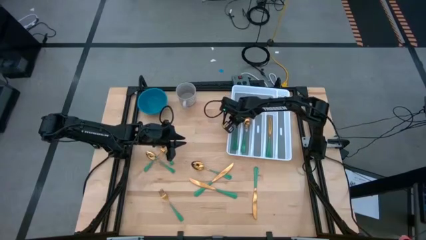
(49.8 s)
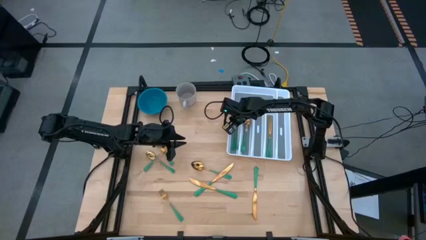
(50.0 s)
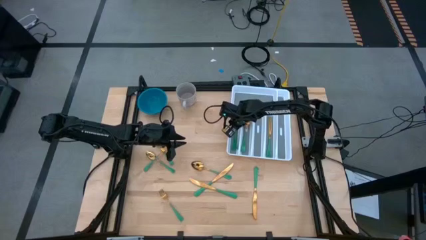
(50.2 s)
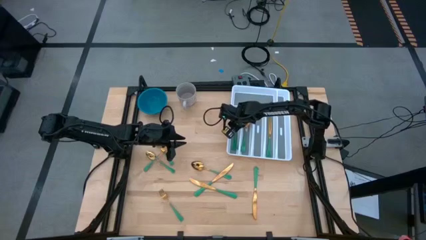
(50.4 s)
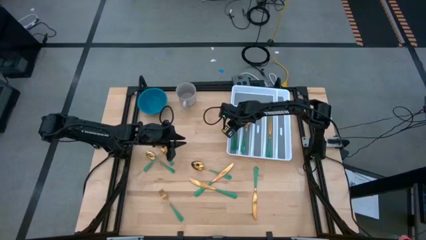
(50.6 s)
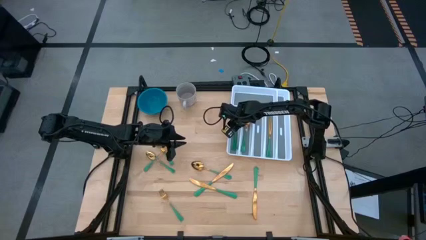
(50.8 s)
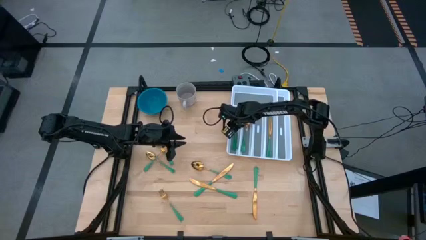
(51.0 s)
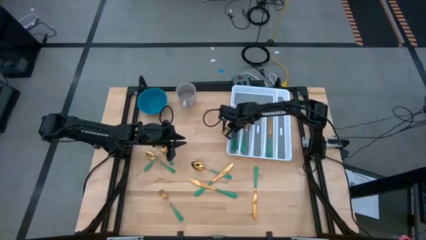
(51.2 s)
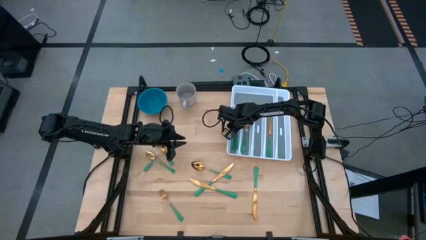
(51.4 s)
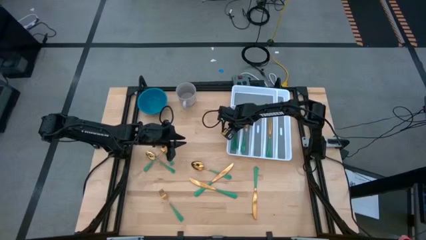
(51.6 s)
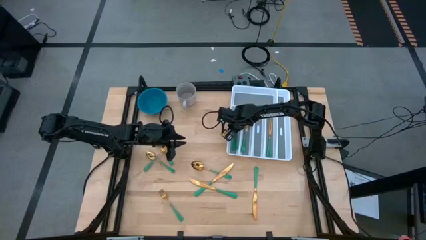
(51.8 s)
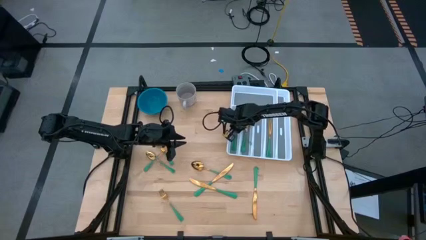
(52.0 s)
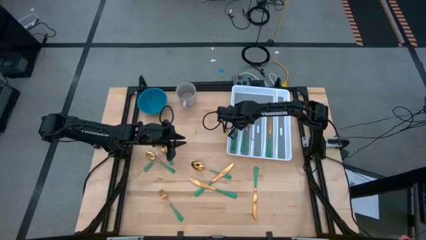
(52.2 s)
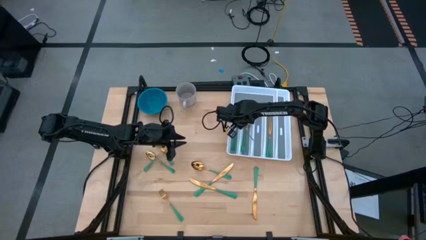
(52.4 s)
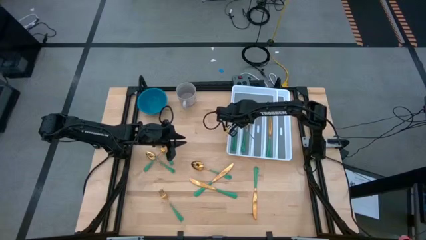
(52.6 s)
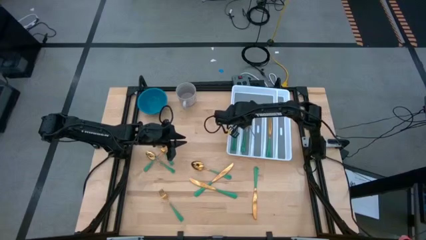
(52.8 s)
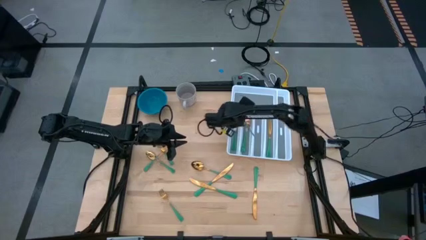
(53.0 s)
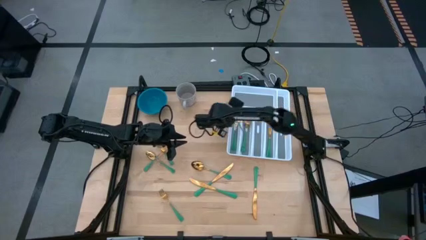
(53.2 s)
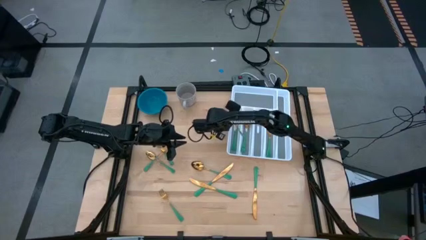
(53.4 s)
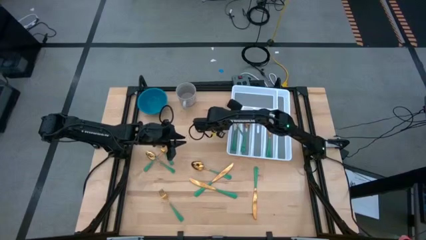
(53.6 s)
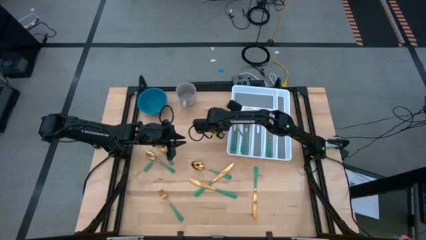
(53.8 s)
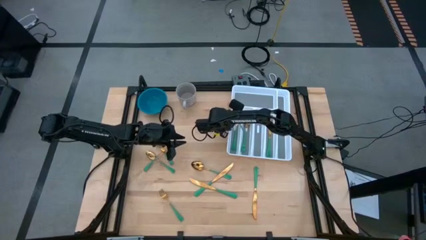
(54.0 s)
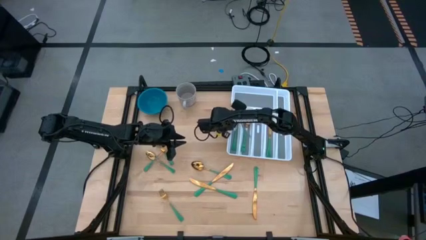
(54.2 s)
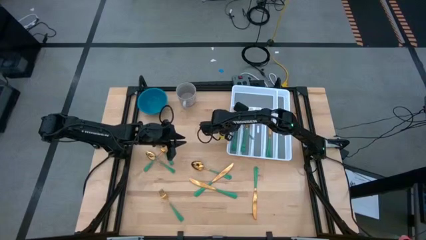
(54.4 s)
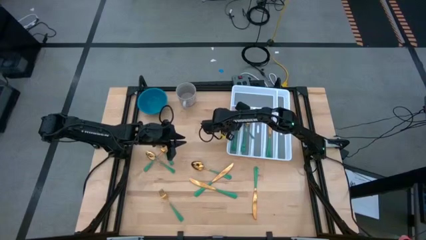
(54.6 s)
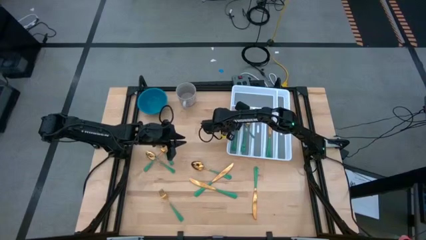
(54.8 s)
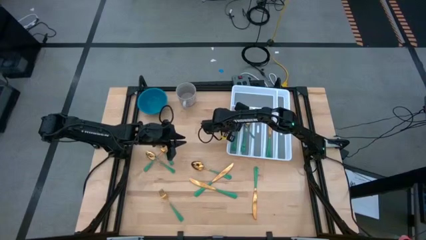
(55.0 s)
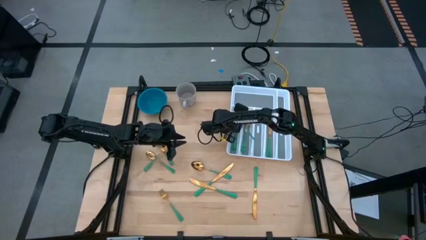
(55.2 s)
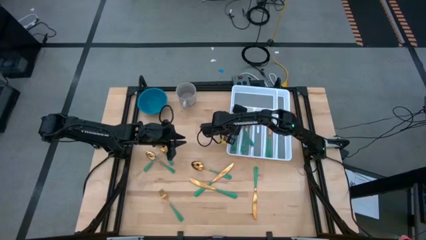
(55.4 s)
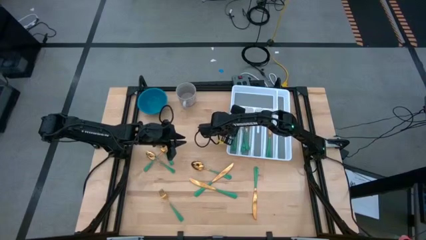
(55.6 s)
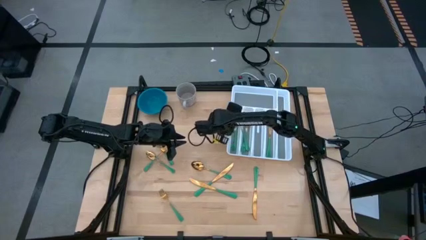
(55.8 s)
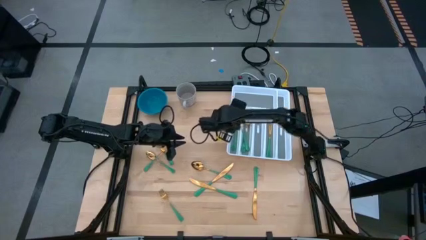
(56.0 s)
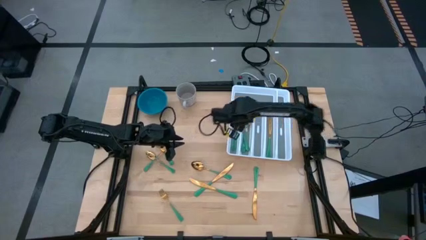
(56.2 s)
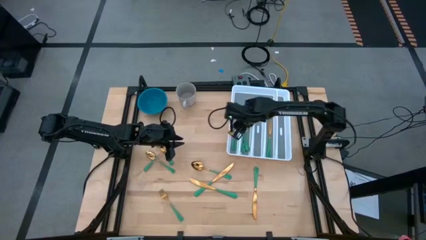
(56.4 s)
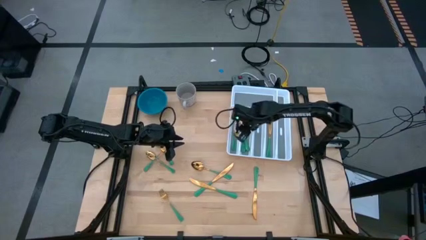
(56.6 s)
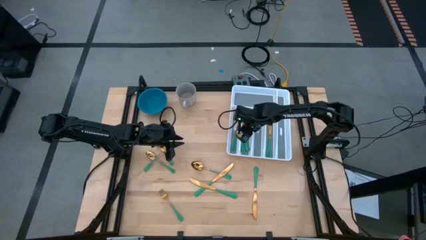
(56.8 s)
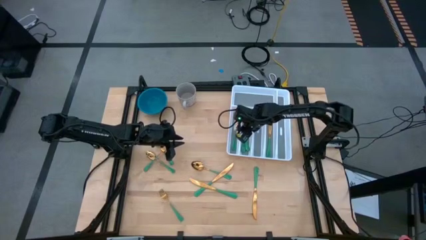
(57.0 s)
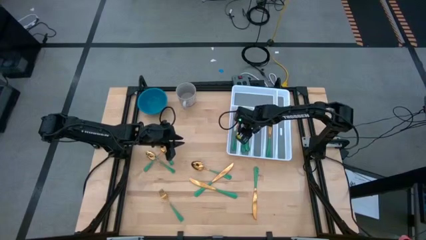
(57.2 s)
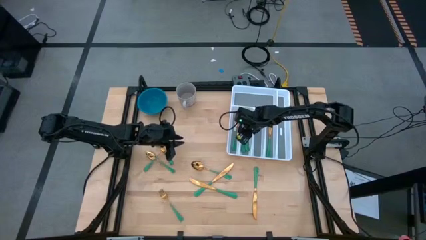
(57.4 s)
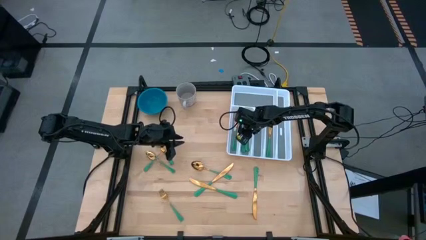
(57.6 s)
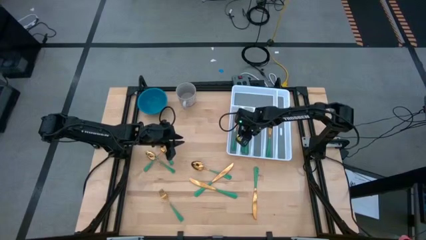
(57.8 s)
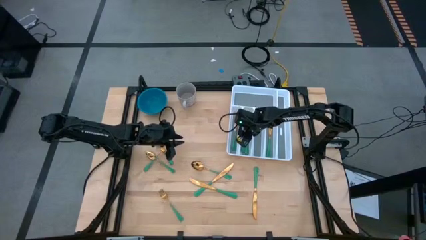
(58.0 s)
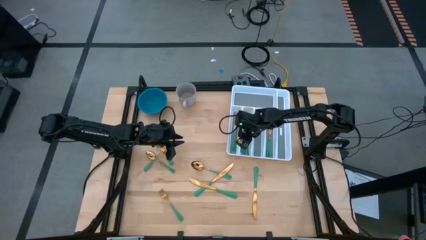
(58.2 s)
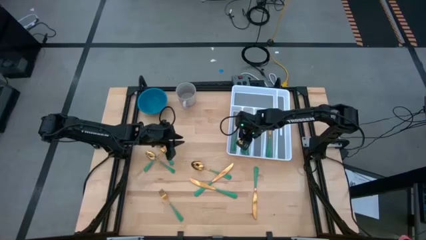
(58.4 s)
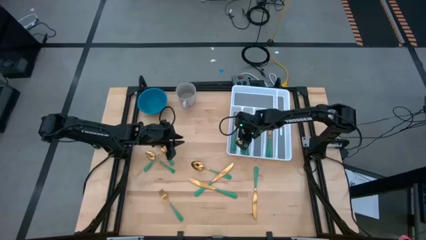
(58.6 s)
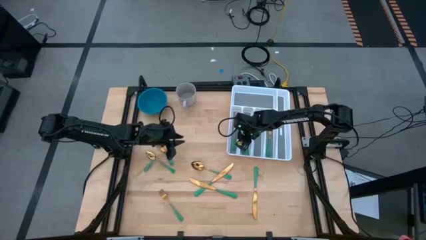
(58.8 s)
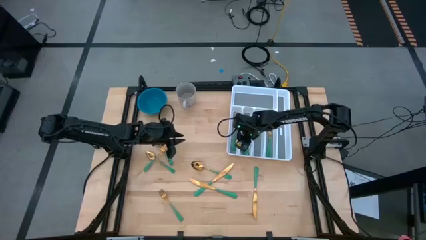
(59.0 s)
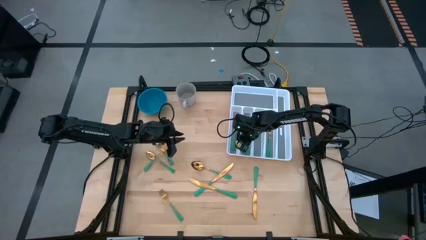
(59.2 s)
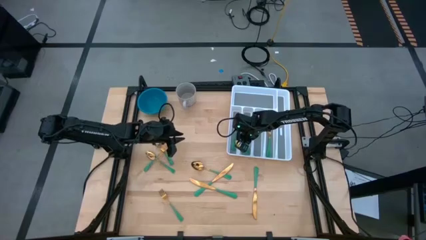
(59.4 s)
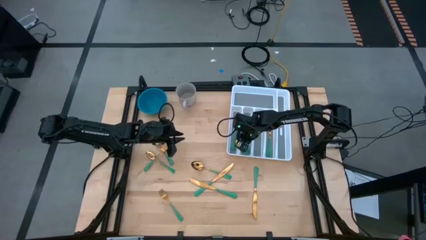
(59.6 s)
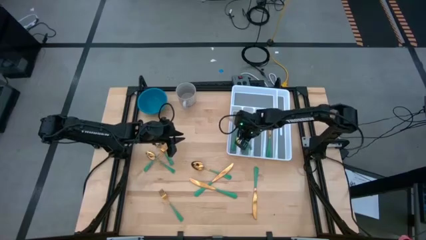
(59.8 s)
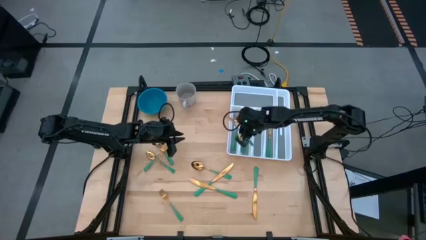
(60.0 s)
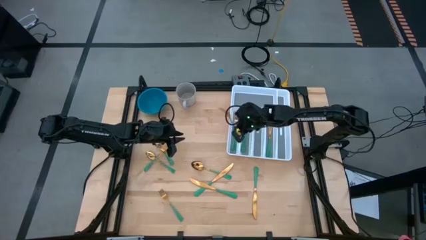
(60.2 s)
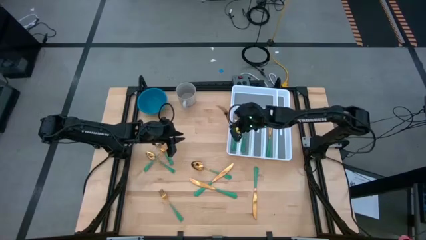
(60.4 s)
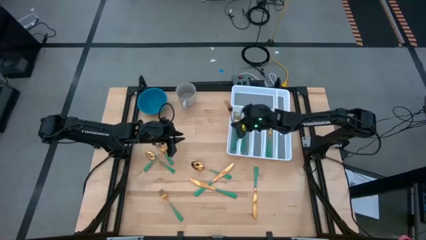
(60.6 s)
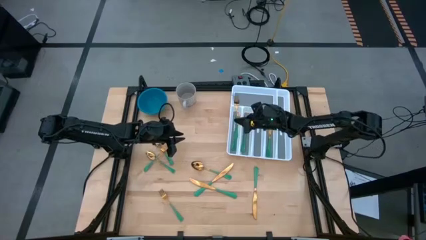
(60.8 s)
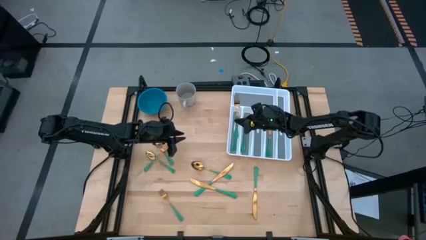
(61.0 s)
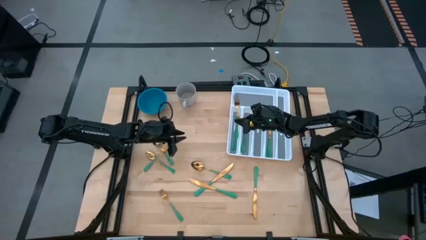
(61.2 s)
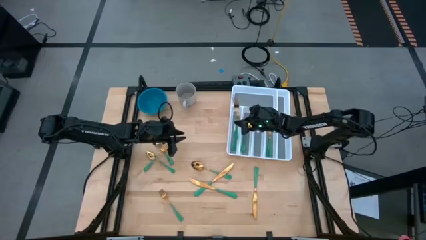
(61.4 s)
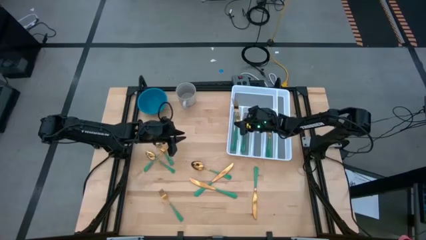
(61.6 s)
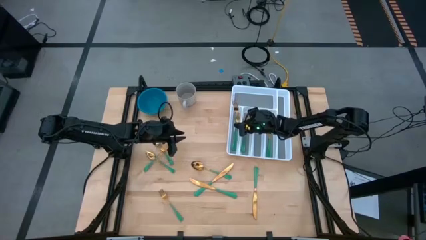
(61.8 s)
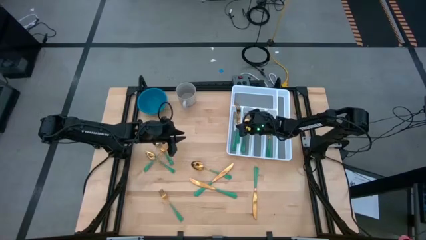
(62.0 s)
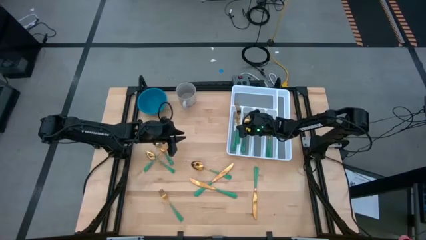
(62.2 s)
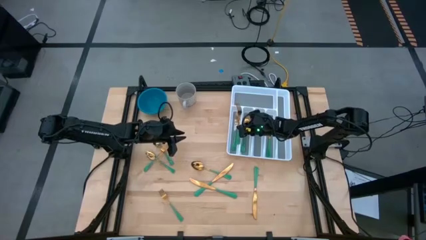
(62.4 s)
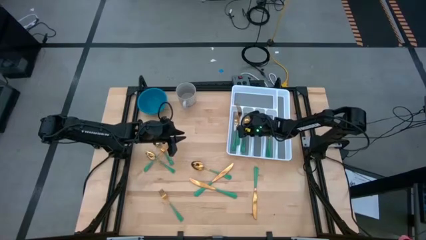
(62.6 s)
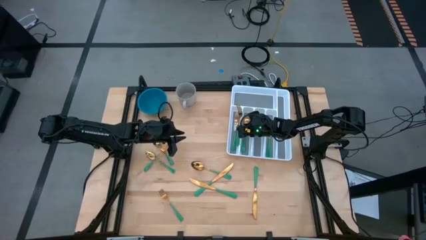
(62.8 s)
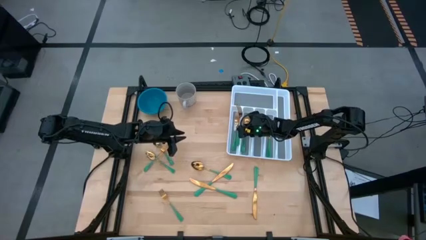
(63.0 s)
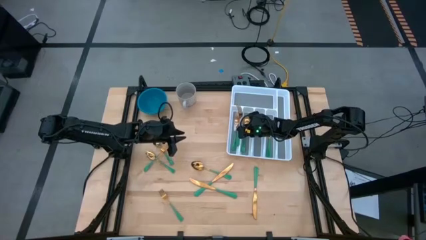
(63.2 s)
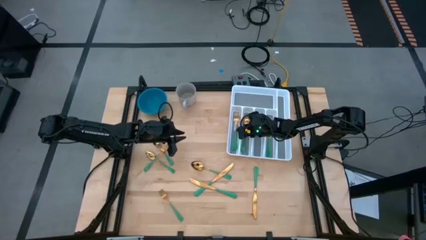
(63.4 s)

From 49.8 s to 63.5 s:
Task: Sort silverware
Adjust the green fork in the white silverware organizer

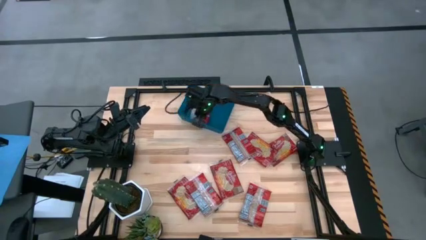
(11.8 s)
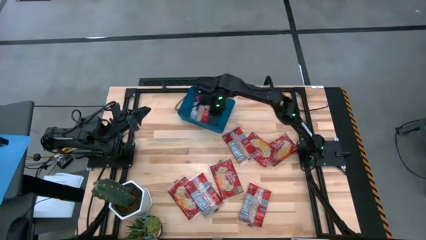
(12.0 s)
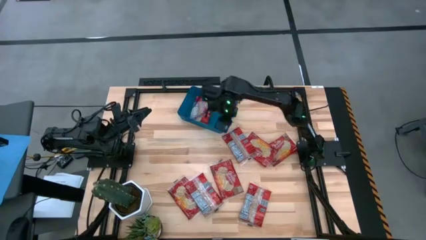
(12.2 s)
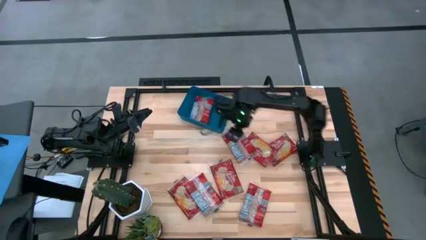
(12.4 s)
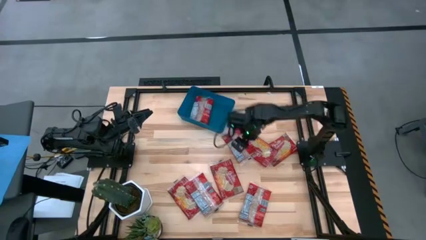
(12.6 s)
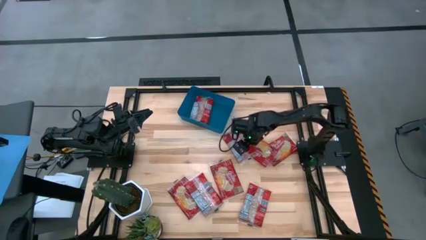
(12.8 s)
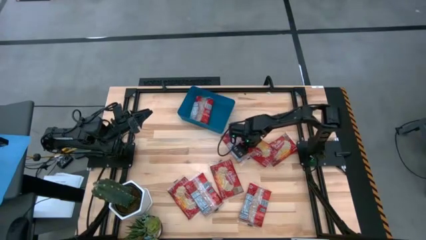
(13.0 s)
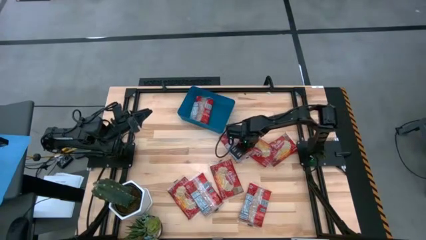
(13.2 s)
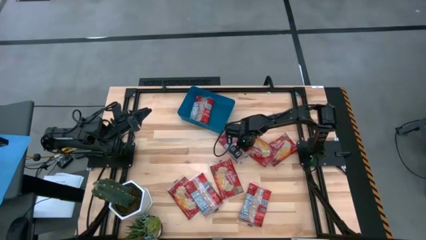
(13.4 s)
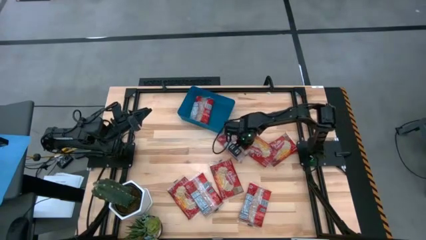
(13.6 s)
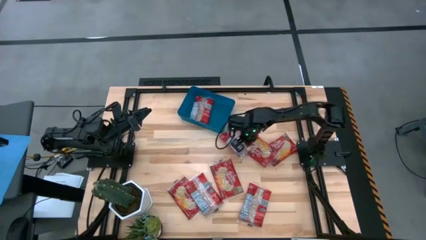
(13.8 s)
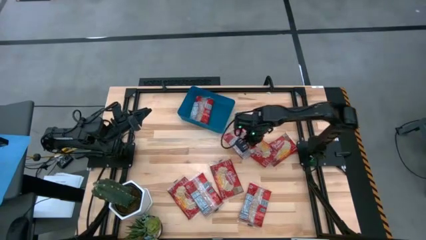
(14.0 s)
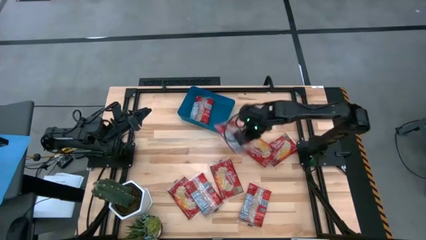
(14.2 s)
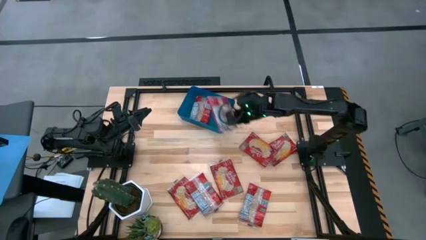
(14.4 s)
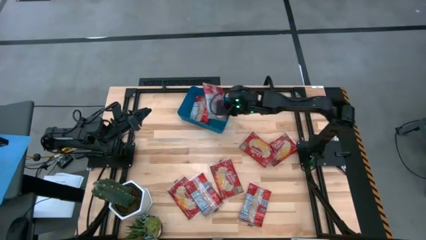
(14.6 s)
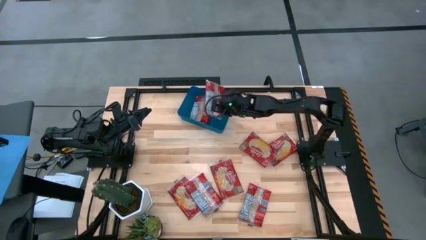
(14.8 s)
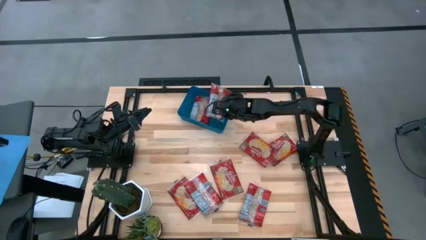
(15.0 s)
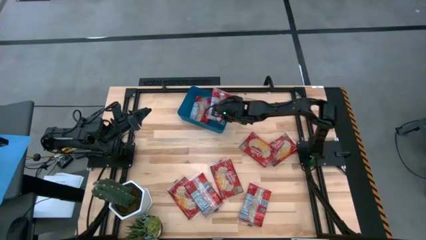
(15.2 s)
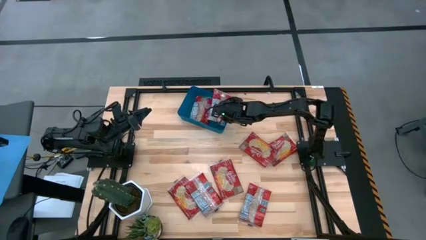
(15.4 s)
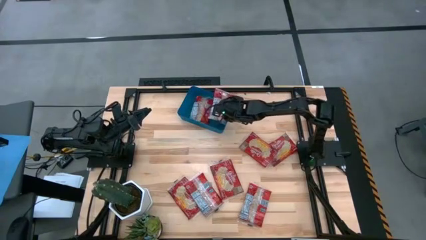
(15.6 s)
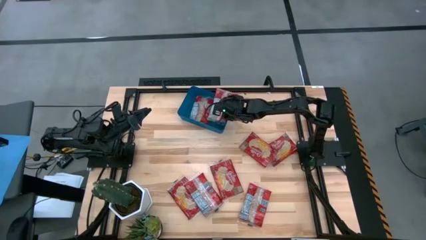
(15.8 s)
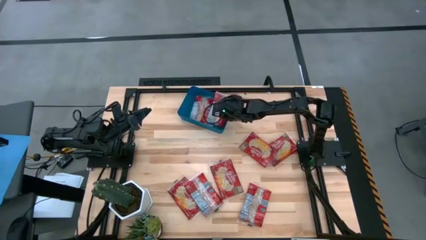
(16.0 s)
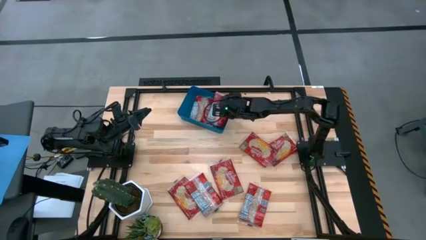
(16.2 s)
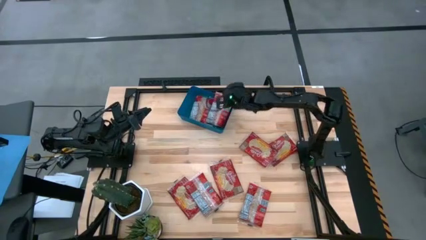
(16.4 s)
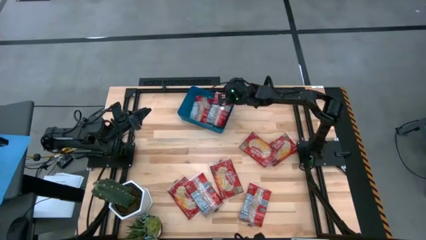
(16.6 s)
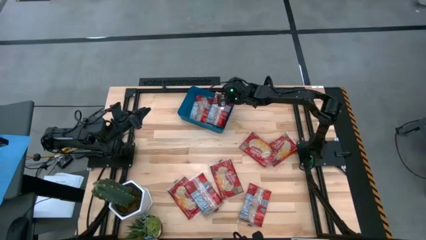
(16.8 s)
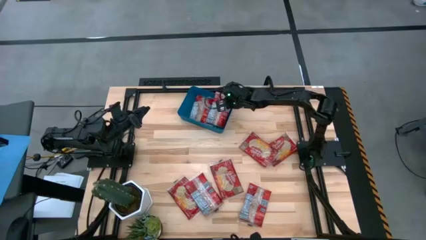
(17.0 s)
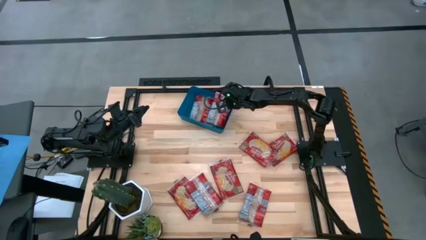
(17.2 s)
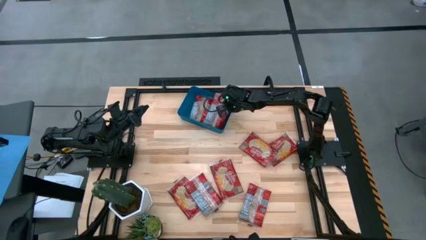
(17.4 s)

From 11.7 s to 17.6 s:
Task: Sort popcorn bags into baskets
Put the red popcorn bag into the blue bin
